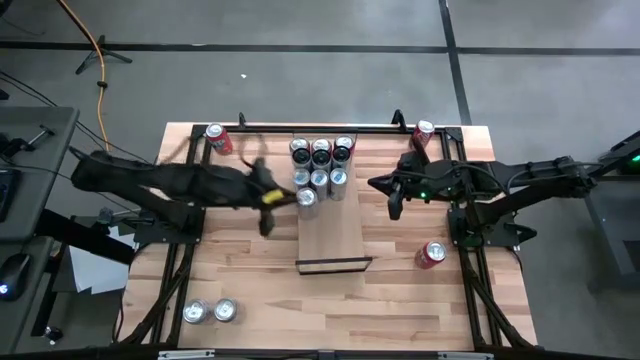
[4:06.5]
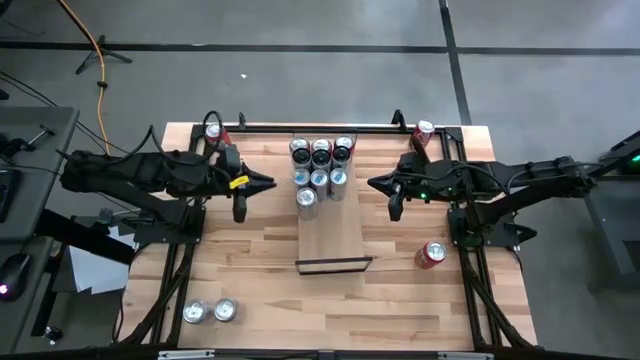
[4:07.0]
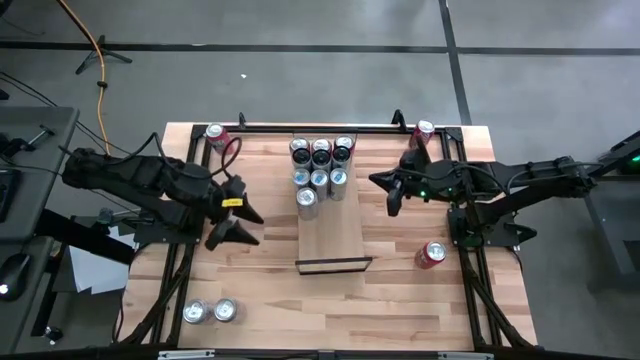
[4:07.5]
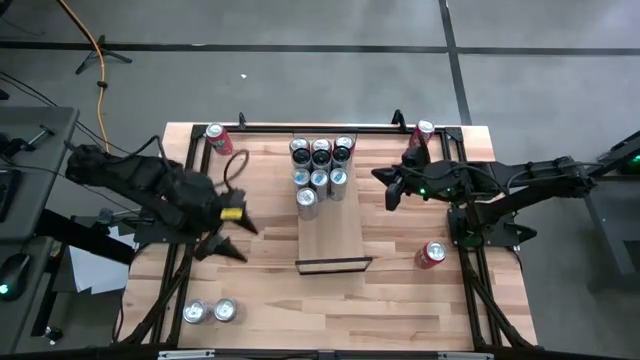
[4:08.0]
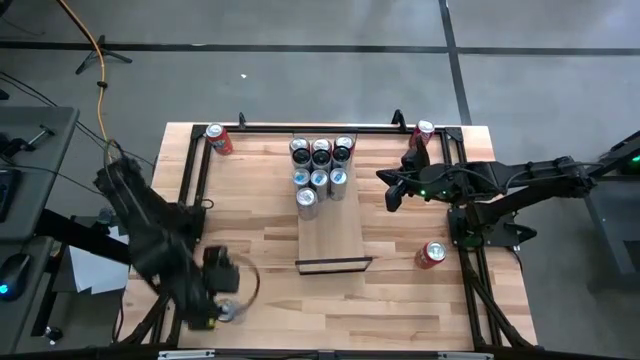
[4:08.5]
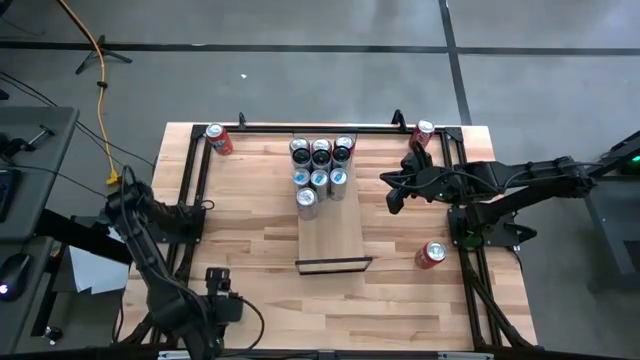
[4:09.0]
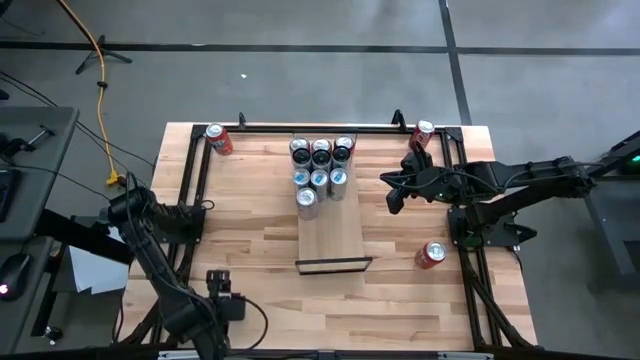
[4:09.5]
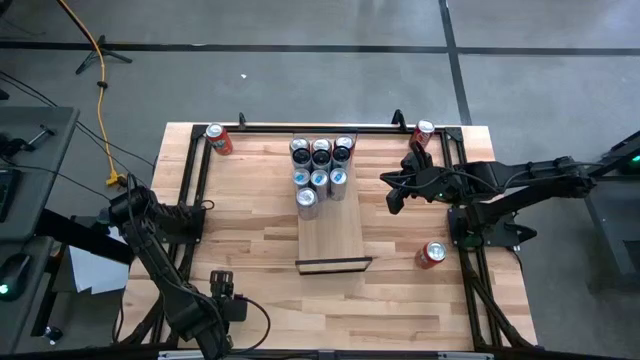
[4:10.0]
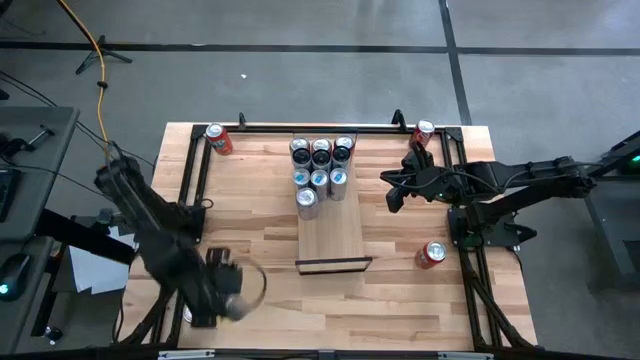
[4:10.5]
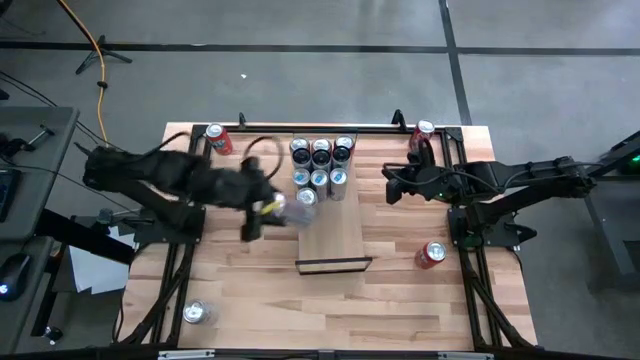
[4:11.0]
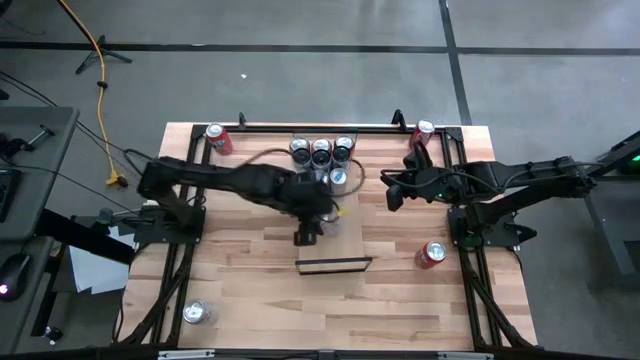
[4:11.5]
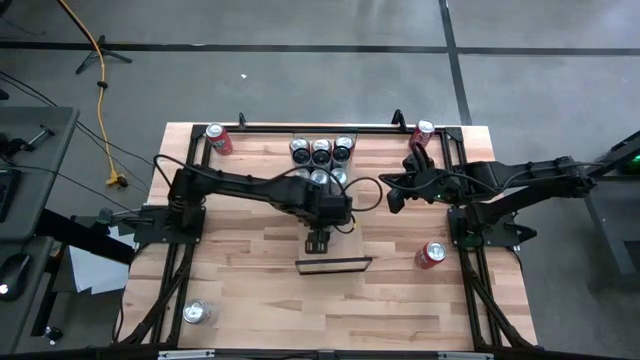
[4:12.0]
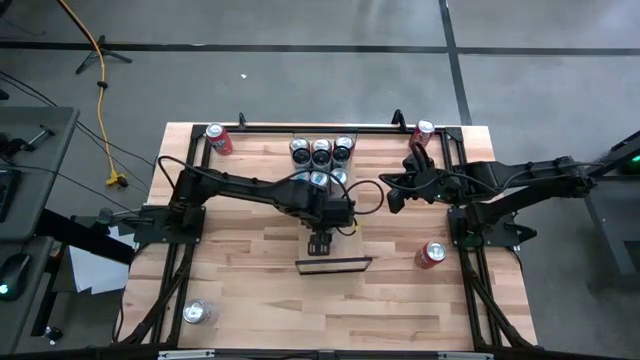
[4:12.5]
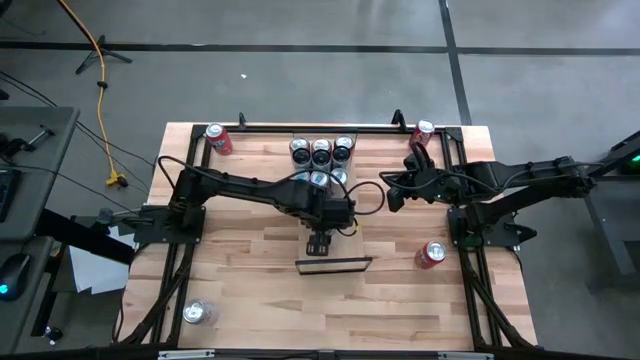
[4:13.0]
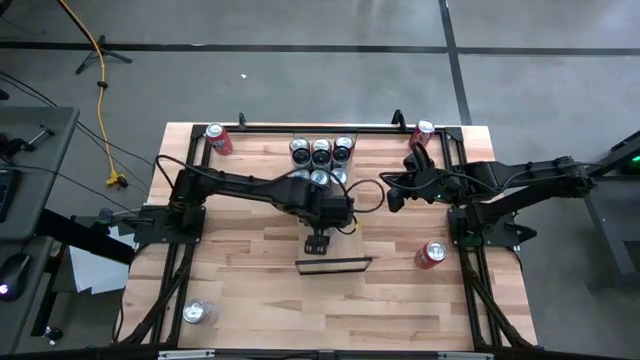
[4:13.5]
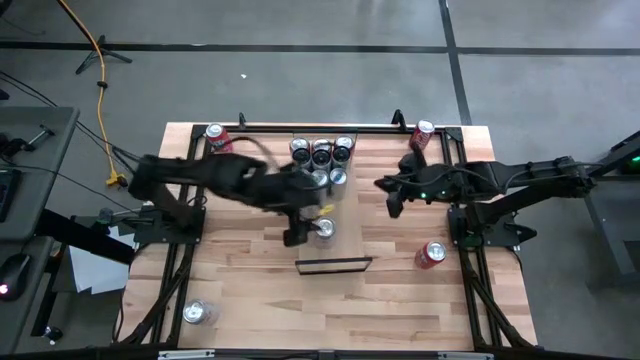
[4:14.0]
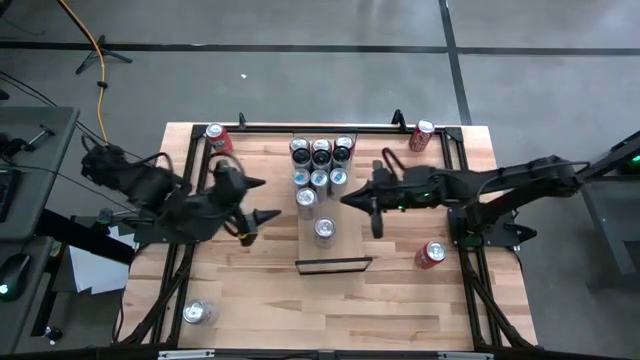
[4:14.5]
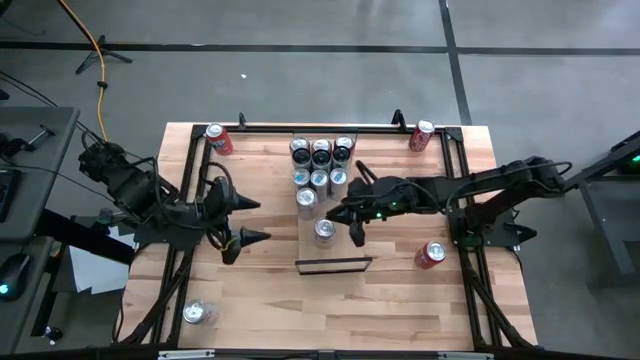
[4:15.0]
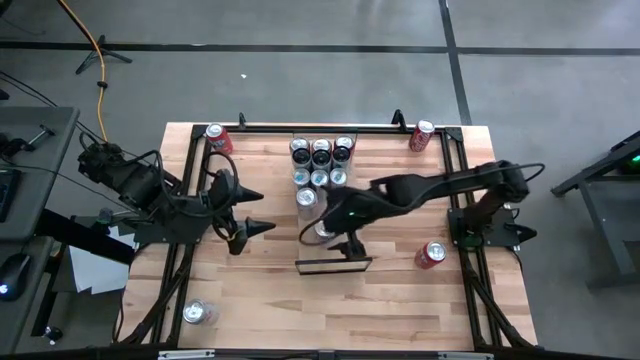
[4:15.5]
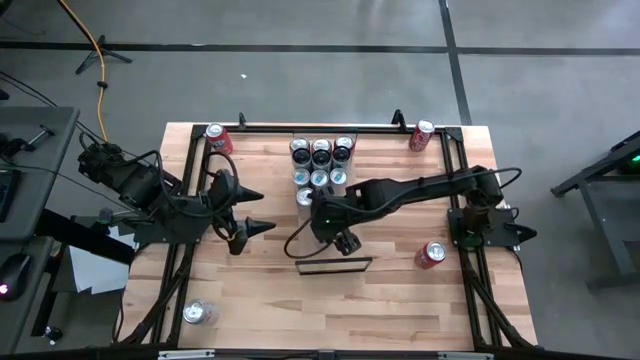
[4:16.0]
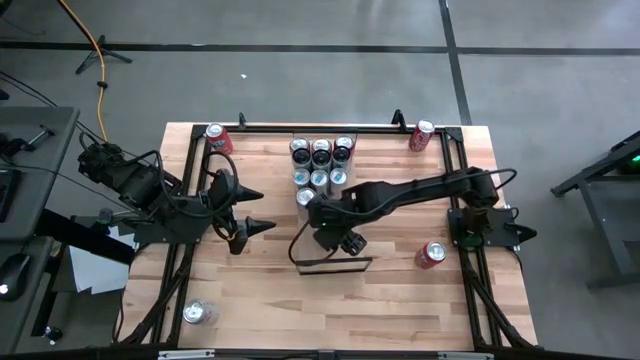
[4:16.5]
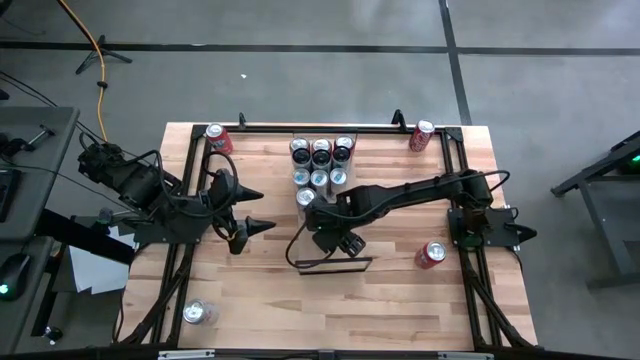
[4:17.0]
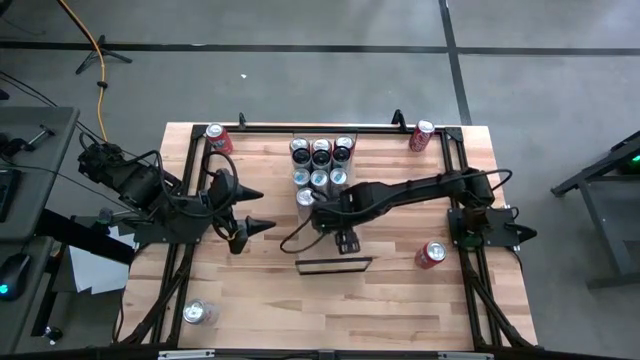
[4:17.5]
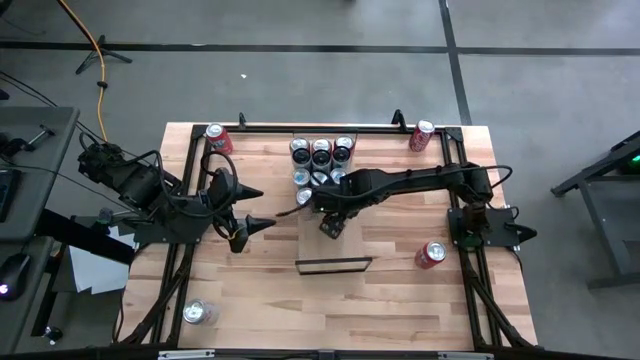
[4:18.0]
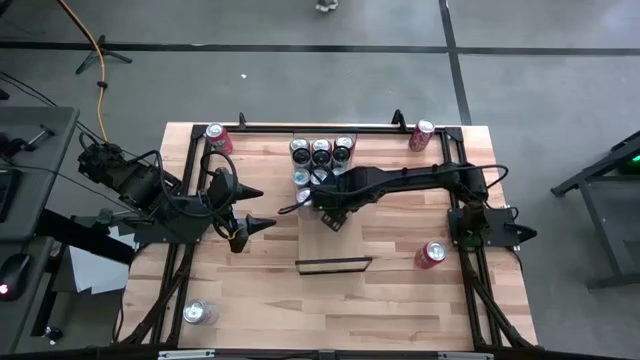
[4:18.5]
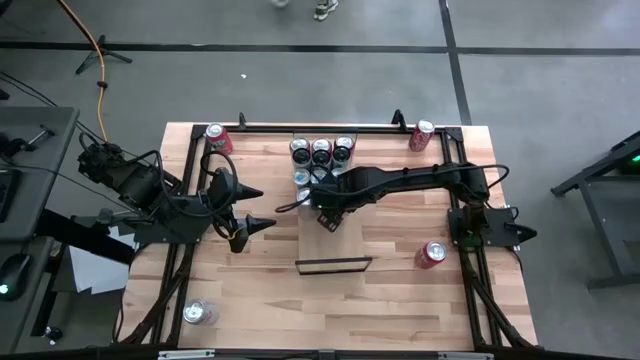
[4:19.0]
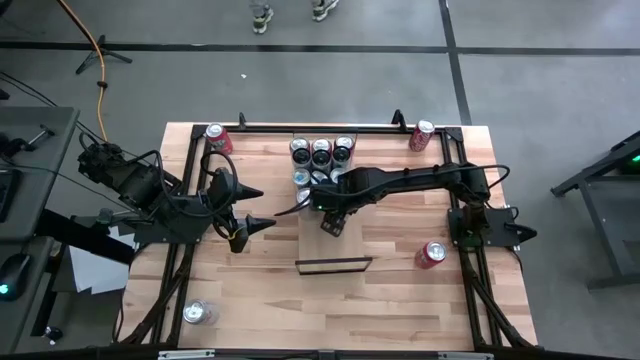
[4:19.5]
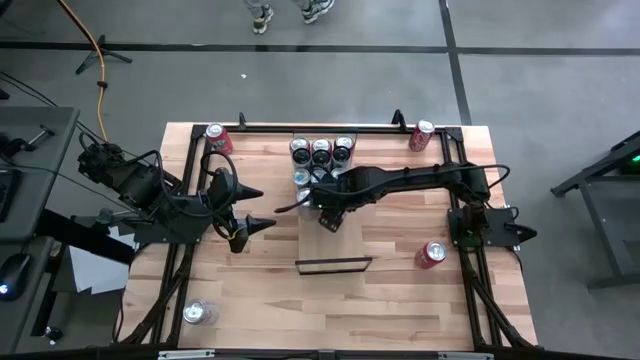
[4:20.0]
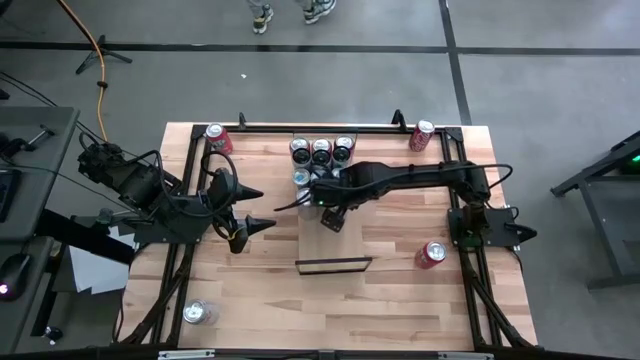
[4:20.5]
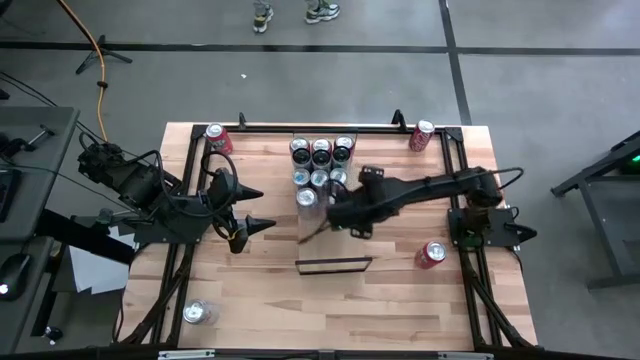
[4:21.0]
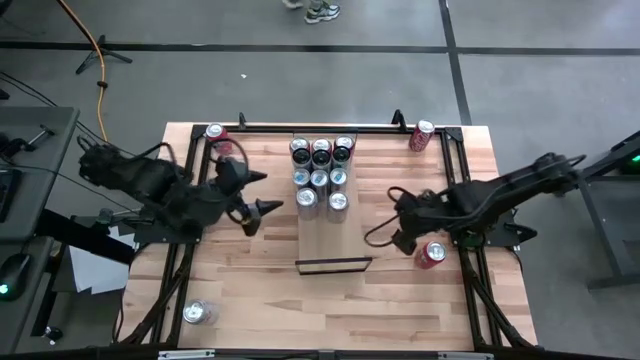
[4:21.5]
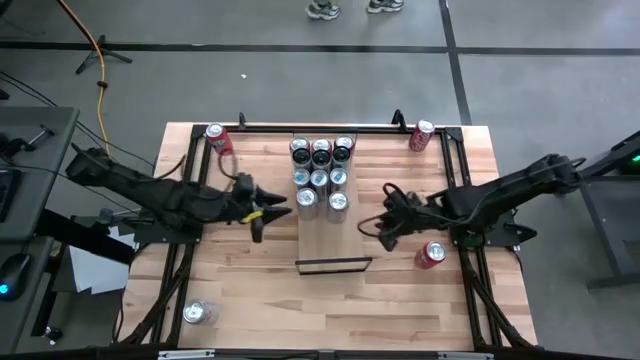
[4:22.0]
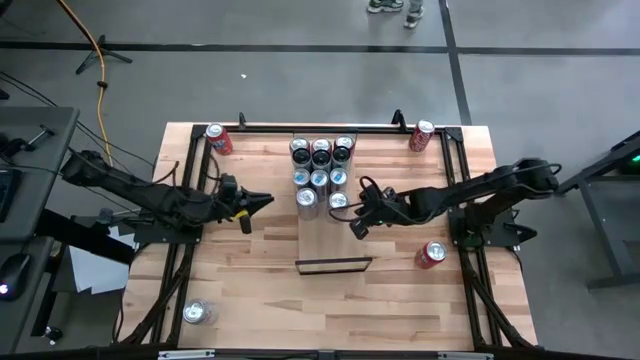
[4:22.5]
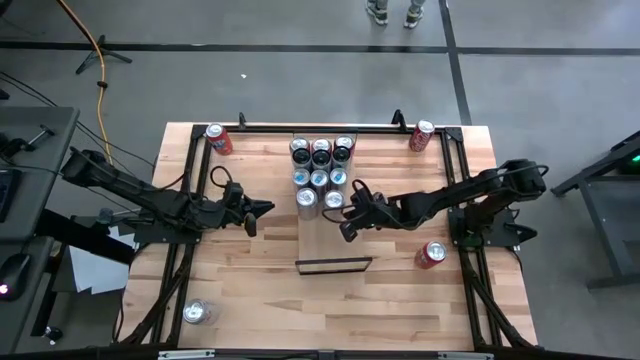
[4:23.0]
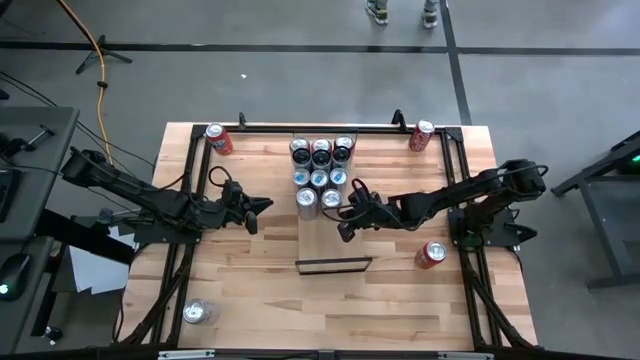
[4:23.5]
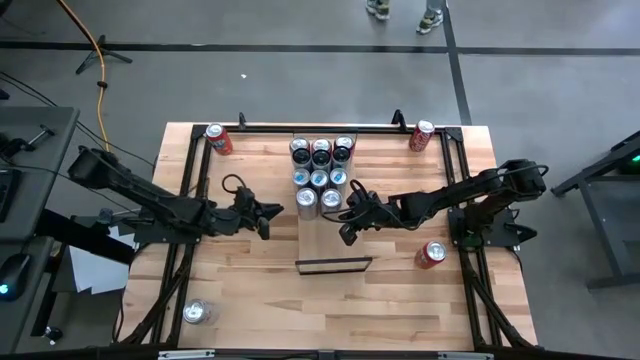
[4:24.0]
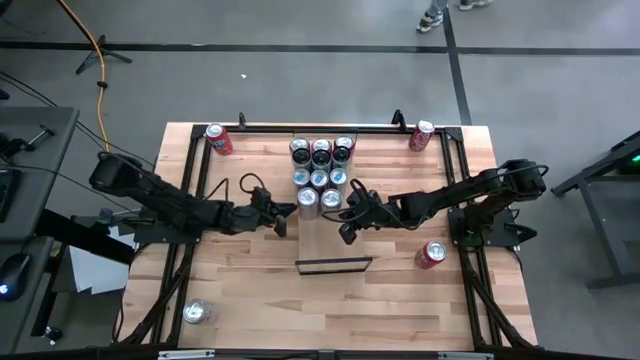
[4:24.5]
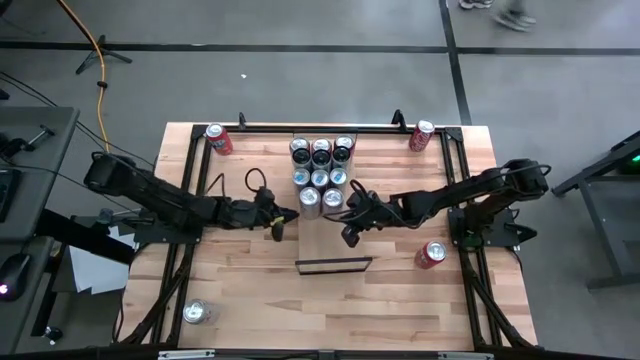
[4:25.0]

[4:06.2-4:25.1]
Task: Place canned beverage on shelf
Put the silver soda can on the shelf aligned with the other silver soda can

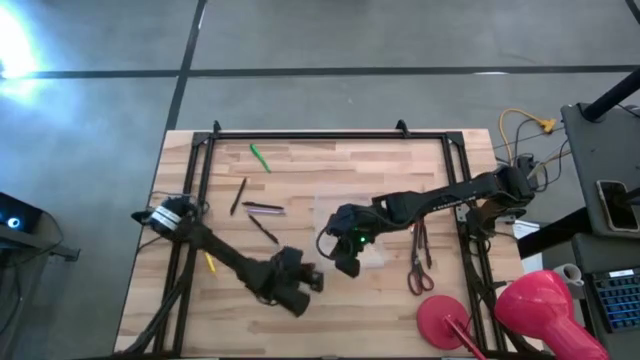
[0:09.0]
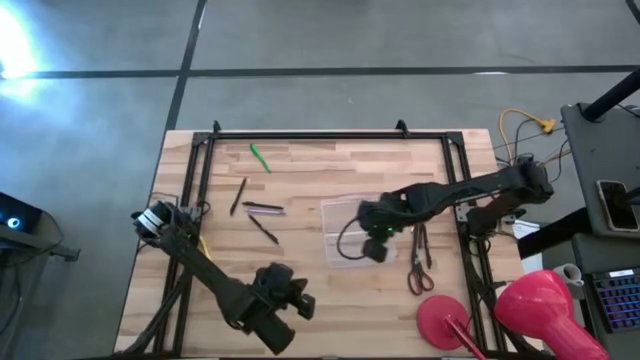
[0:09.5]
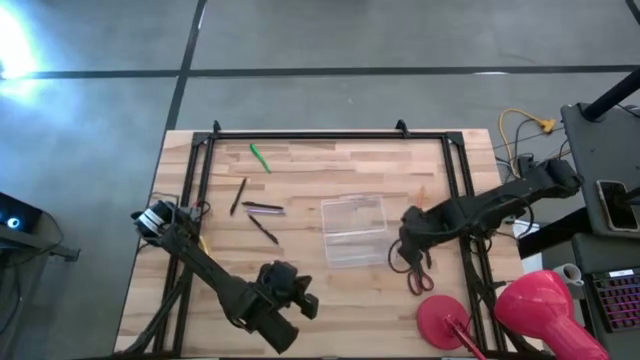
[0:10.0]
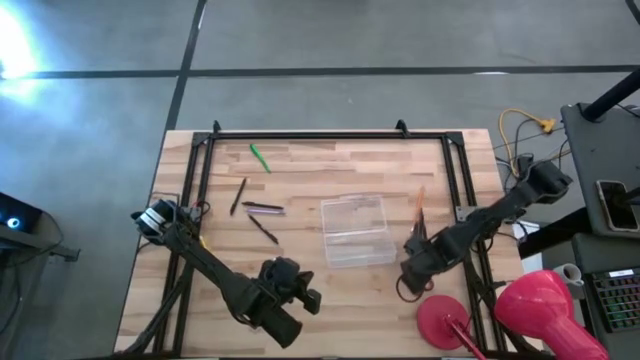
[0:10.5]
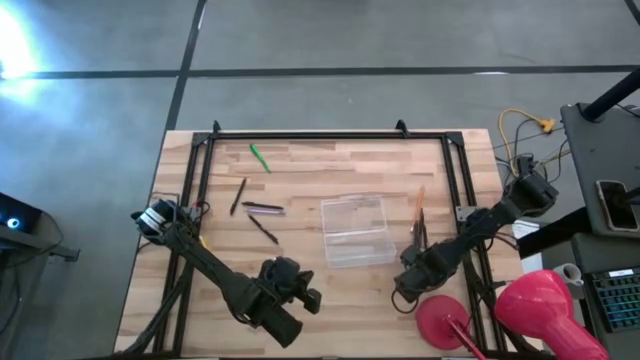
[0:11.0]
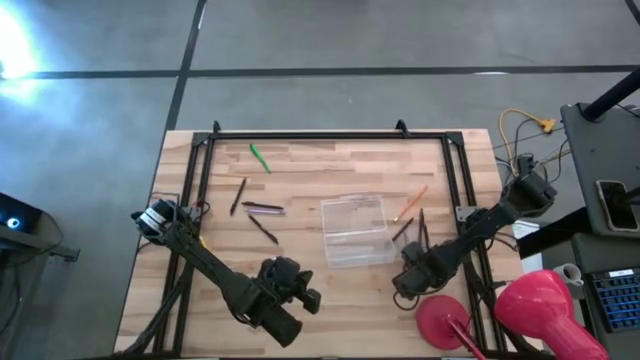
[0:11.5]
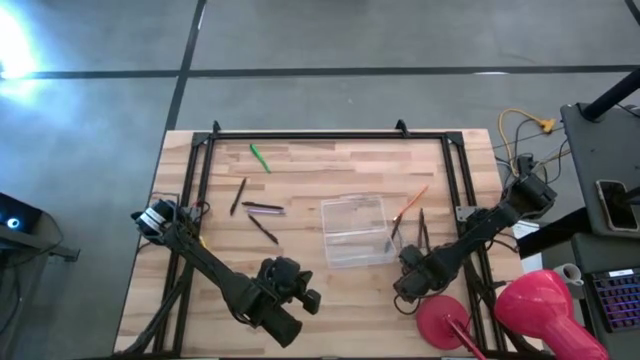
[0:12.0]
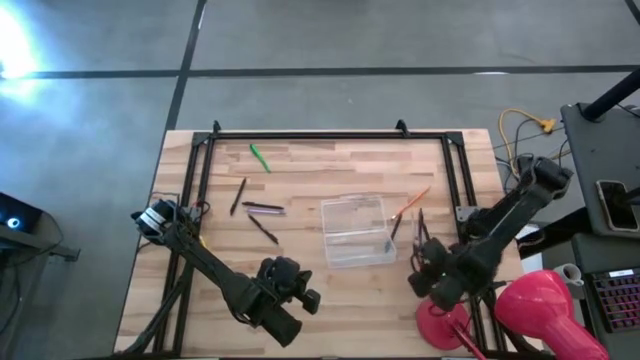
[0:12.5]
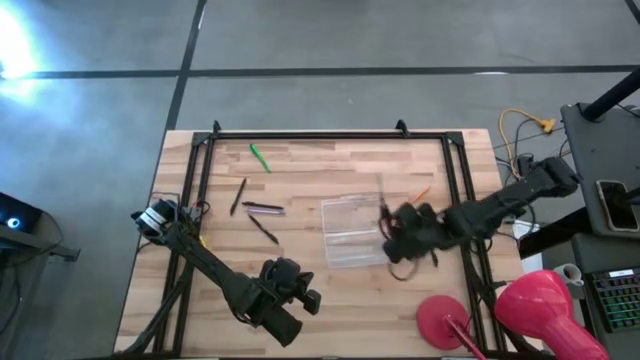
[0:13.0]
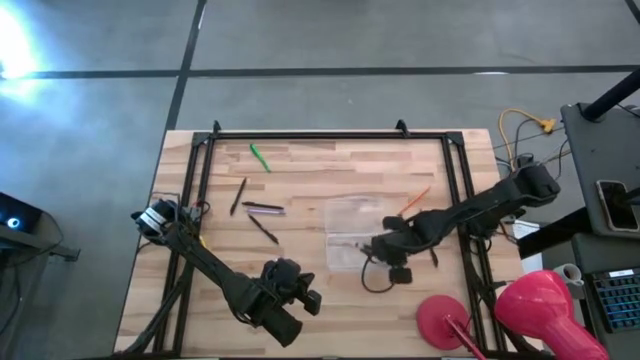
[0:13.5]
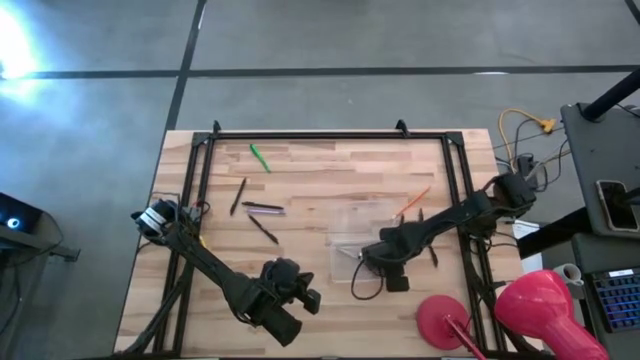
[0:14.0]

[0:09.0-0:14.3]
Task: Pick & place school supplies into a supply box
Put the black scissors into the transparent supply box
